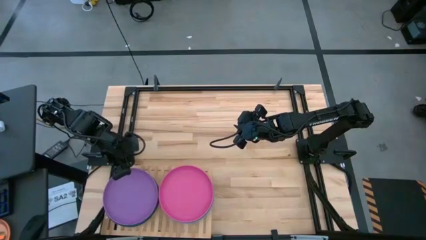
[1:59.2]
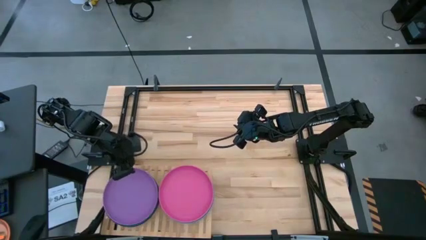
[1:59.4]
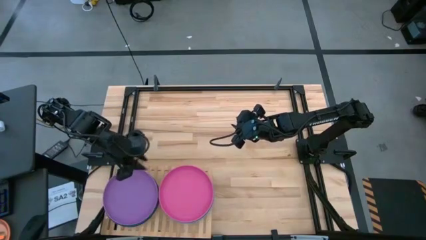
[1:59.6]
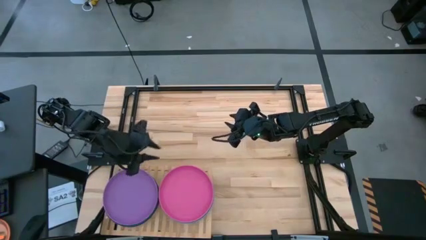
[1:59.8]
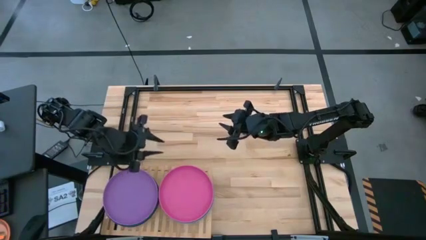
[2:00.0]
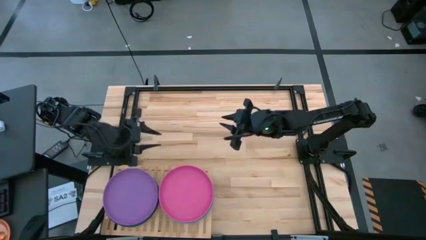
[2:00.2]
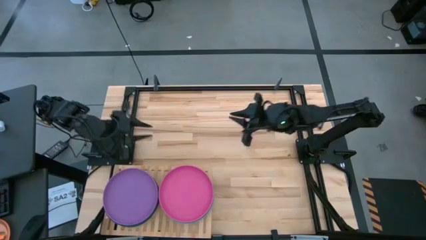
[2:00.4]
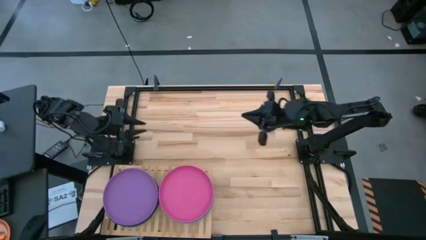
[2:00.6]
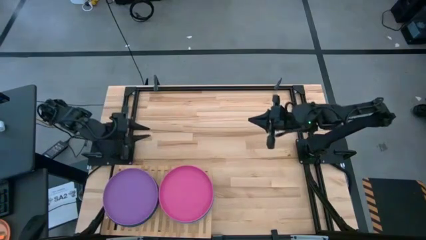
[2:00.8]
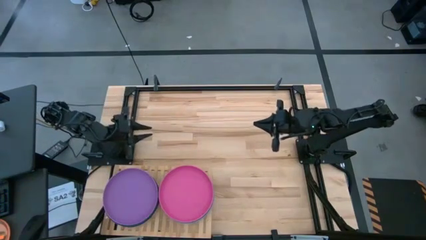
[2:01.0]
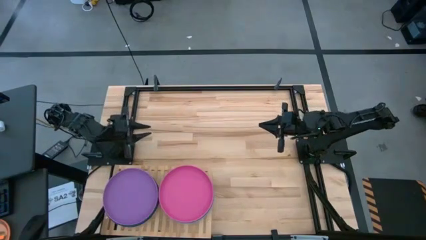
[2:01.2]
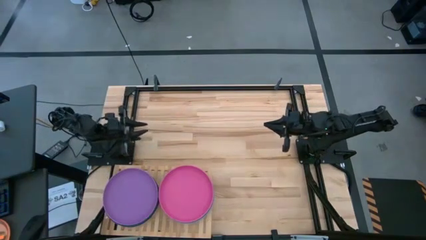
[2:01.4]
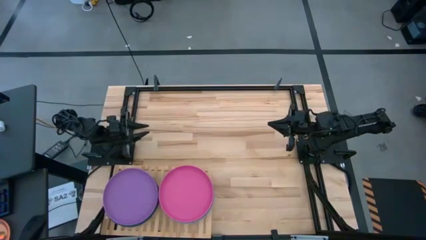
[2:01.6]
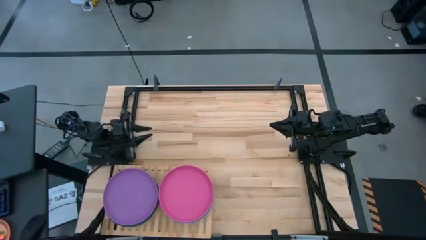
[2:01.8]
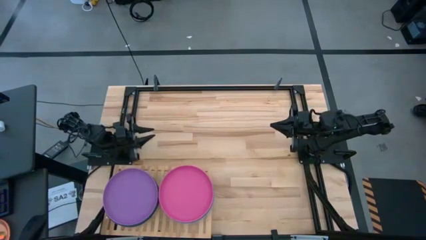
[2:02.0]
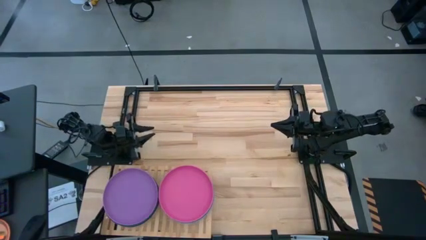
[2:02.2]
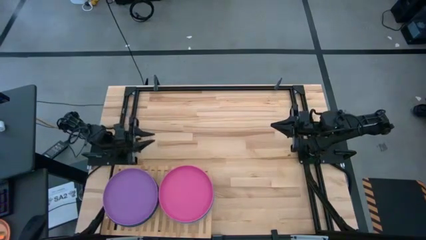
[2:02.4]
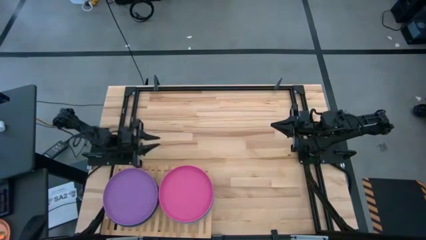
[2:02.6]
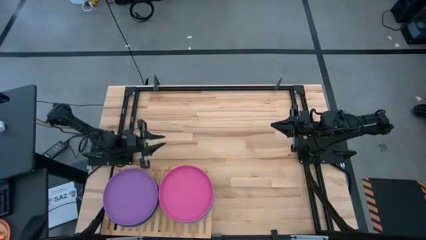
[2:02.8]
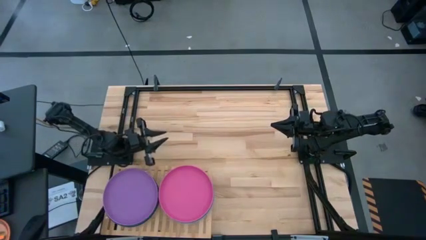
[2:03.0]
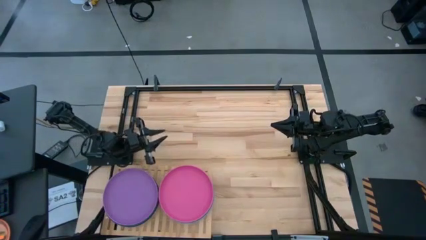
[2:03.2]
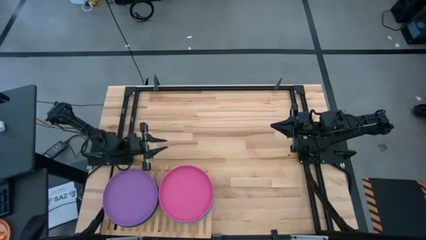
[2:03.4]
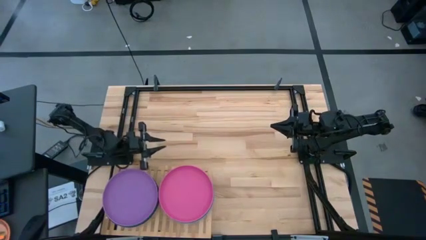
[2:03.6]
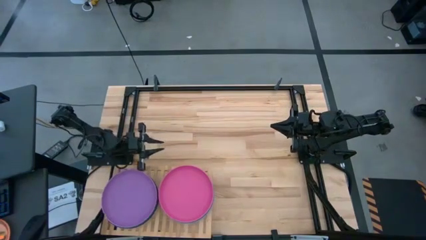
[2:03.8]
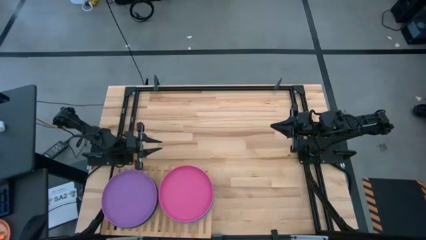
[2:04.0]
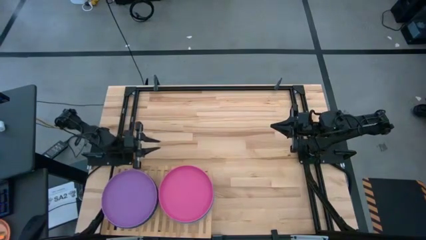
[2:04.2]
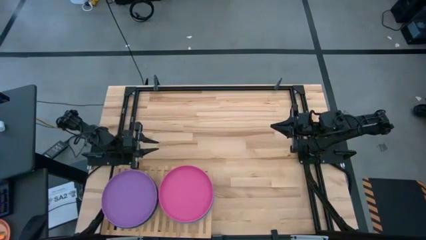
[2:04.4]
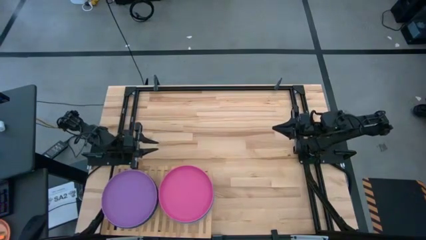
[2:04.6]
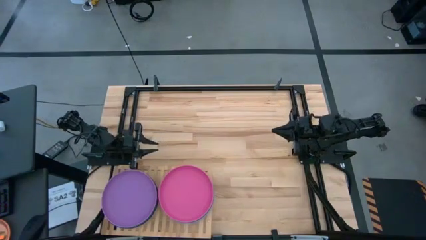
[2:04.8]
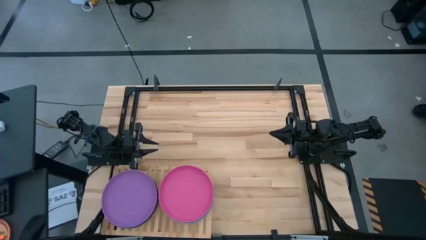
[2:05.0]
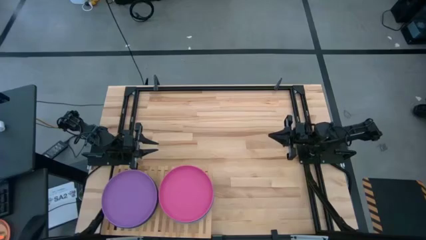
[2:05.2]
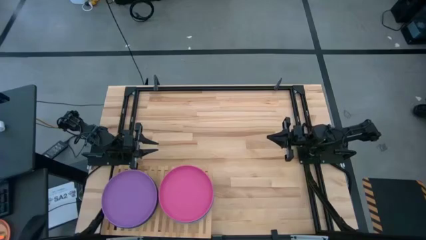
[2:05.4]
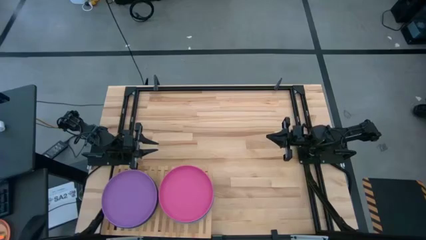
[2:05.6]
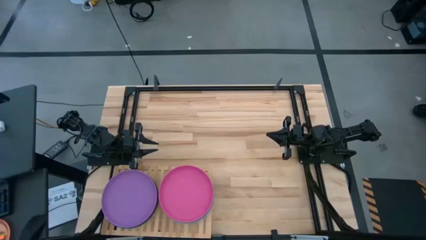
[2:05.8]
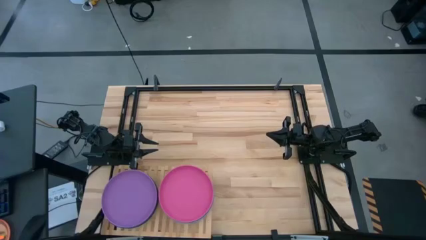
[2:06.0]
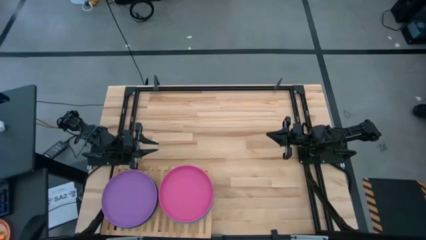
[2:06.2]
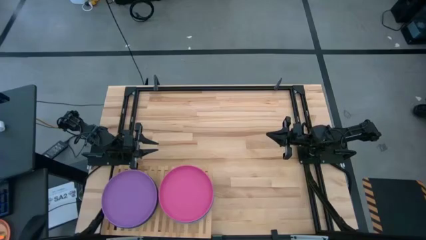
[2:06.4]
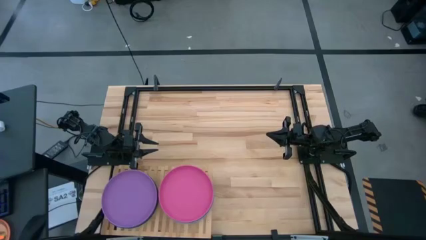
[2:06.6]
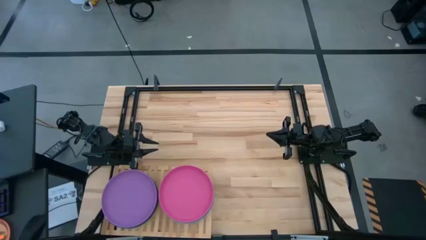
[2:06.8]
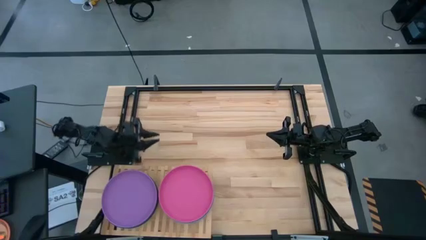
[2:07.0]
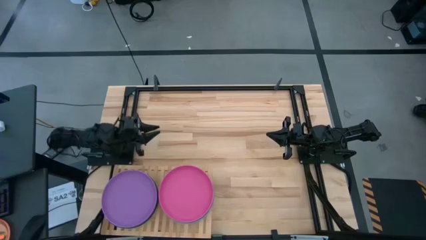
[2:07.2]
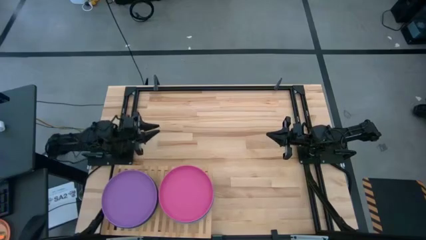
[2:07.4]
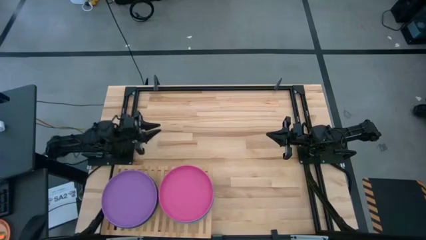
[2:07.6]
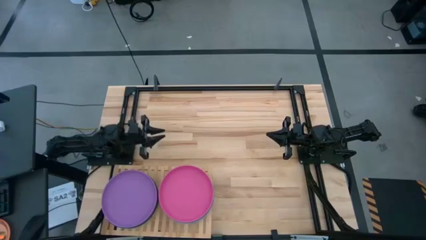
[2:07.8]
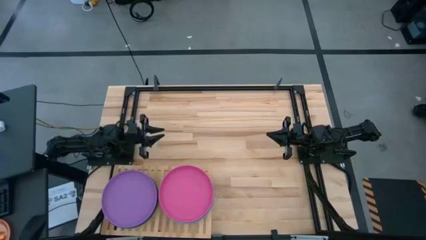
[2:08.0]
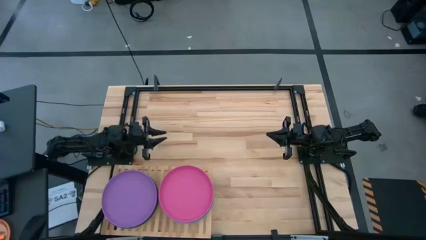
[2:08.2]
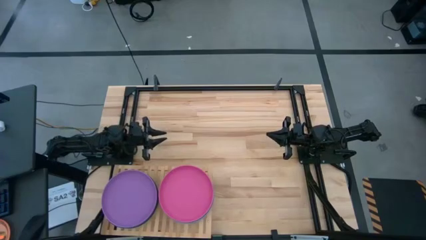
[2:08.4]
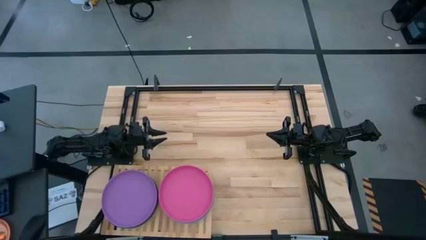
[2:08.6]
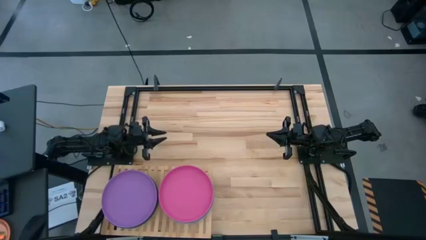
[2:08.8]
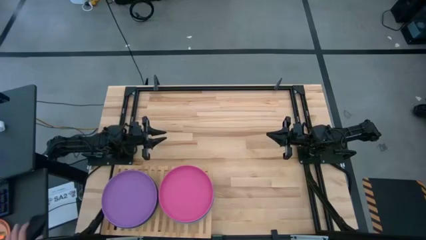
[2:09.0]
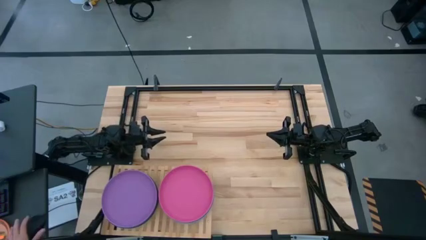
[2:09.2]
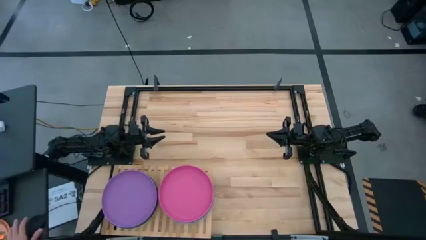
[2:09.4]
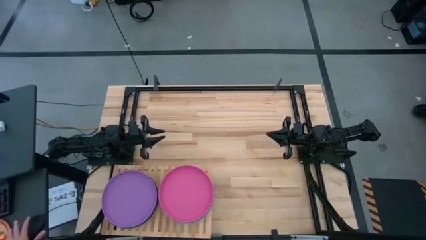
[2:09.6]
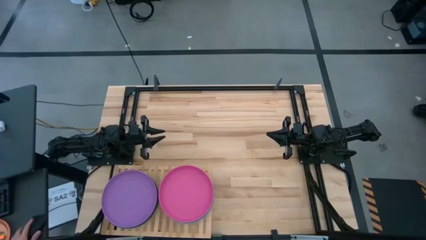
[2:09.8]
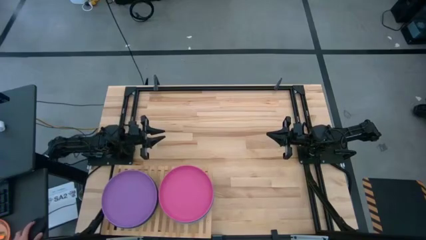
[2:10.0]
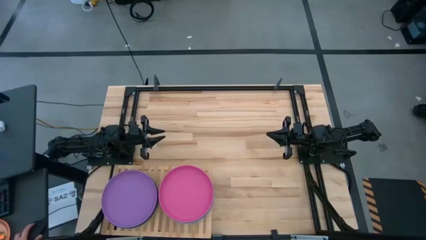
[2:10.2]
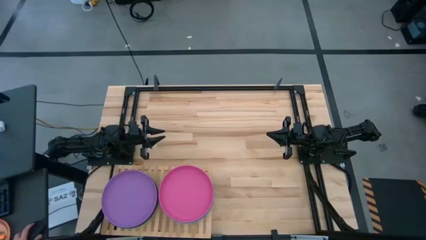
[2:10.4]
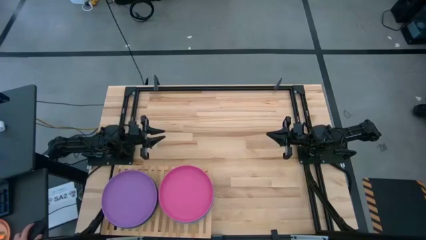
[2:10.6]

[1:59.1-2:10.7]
Task: Place and stack plates onto a shelf
Return to Home Position

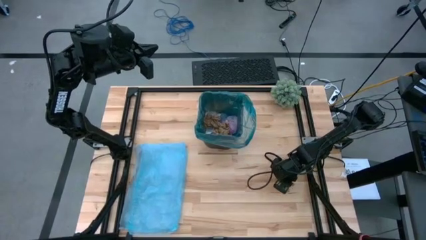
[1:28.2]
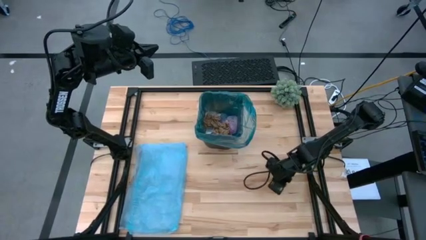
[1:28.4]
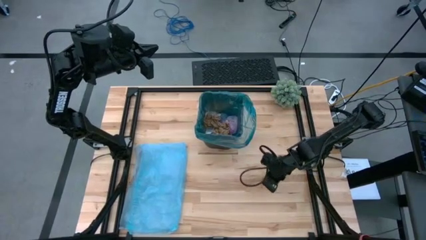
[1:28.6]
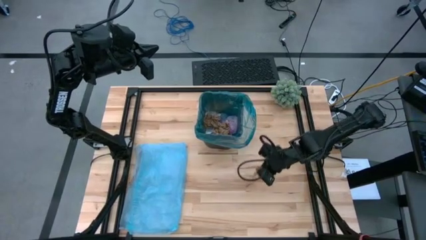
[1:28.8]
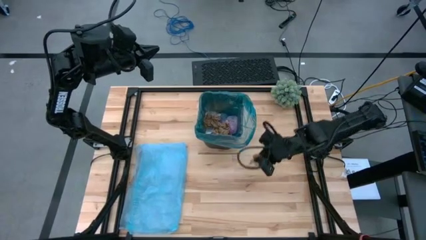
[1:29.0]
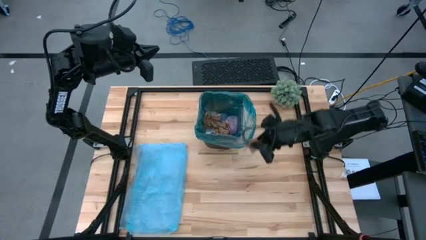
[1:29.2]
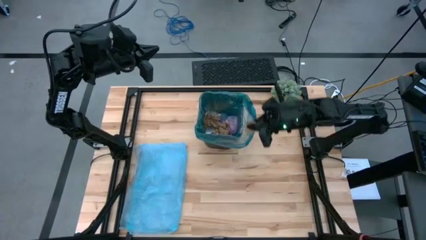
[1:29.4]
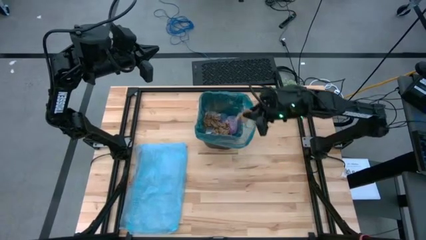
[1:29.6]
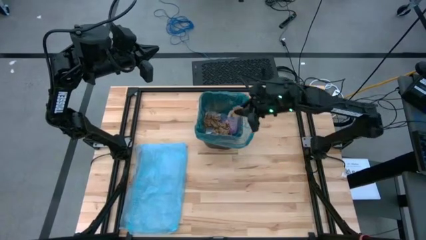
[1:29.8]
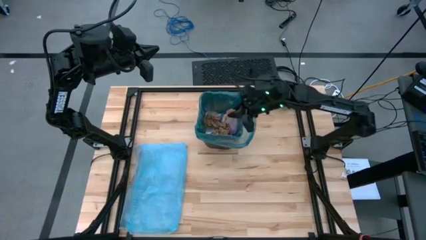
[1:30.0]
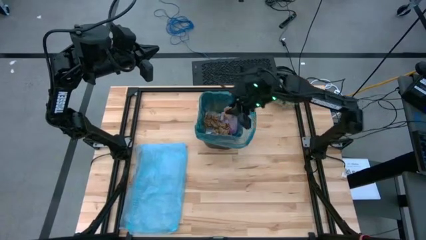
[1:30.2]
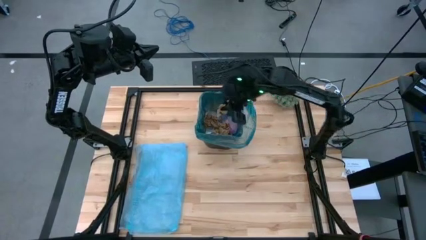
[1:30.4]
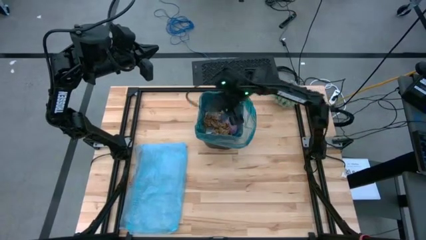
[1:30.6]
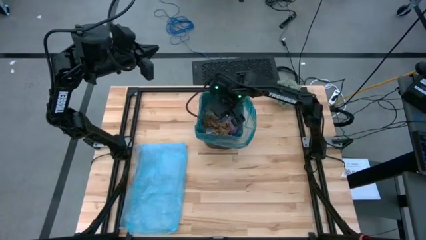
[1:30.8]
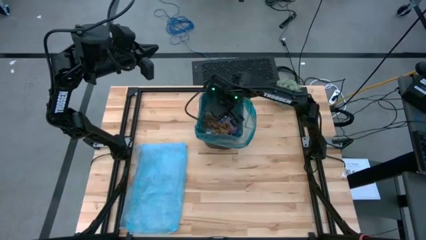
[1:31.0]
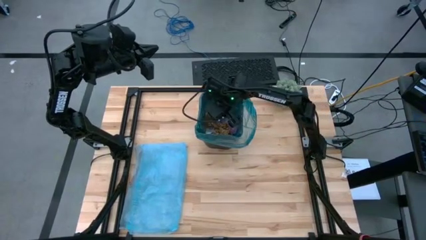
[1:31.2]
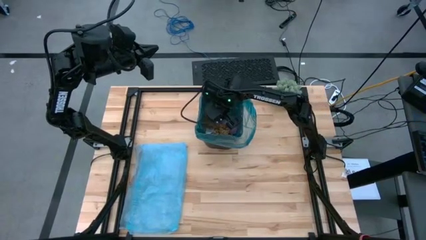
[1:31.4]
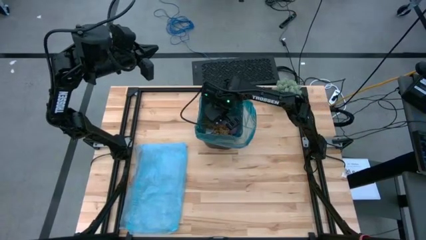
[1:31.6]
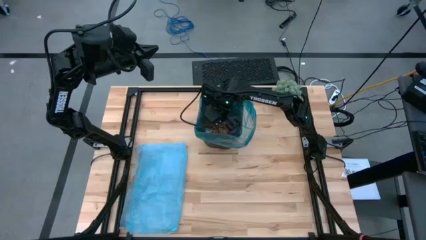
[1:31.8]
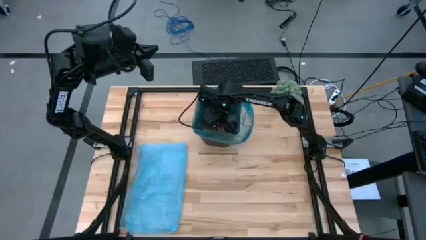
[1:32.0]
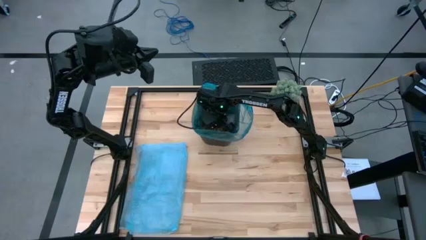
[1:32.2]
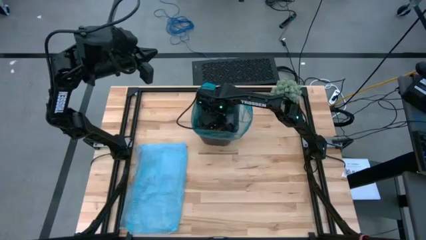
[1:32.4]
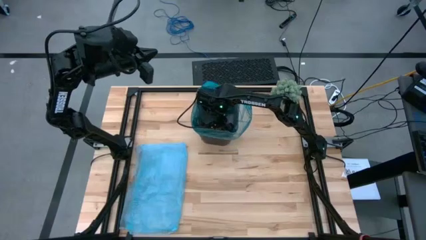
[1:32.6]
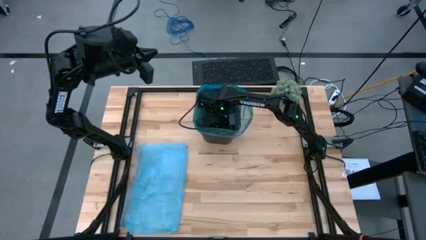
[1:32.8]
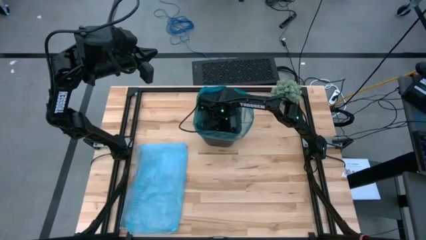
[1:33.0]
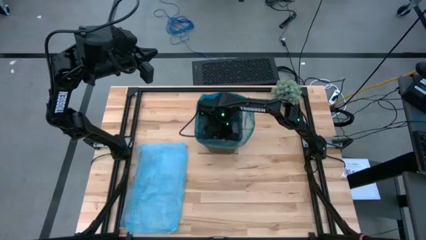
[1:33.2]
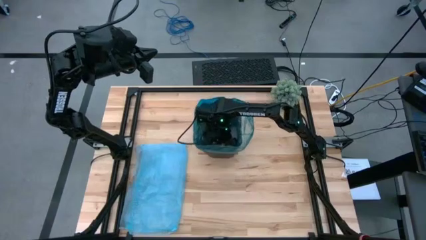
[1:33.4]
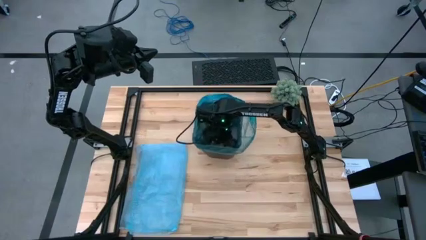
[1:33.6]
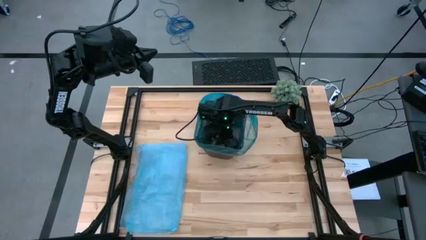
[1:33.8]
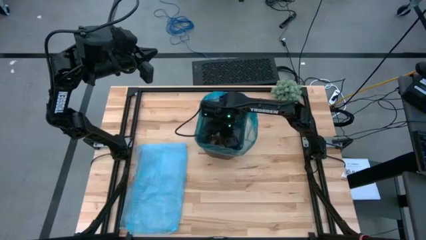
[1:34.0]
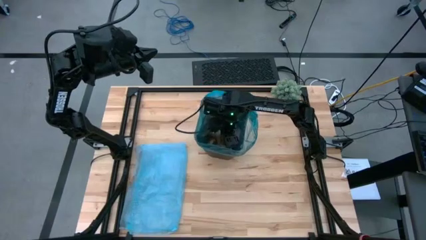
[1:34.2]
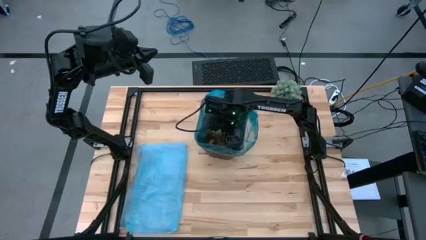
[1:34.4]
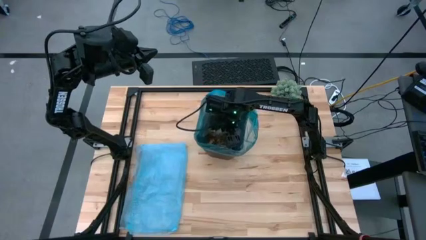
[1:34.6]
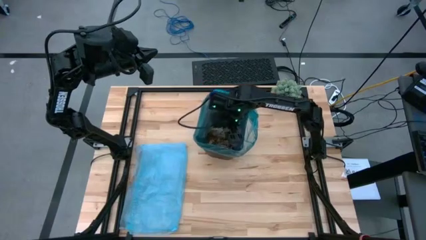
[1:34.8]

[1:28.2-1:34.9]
Task: place trash/remove bag and relplace
Put the brown napkin into the trash bin
